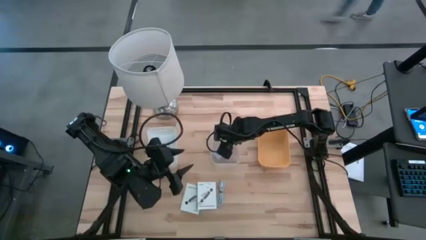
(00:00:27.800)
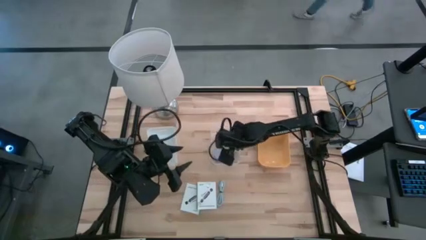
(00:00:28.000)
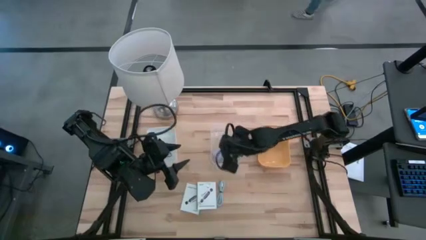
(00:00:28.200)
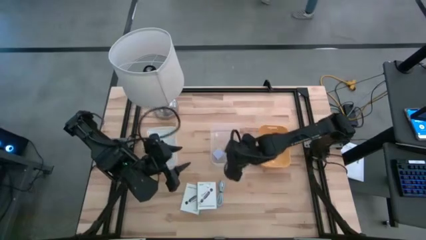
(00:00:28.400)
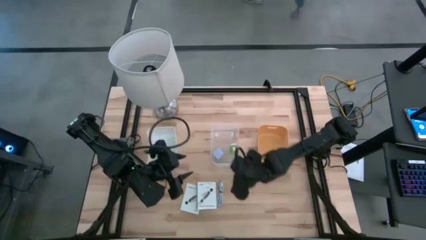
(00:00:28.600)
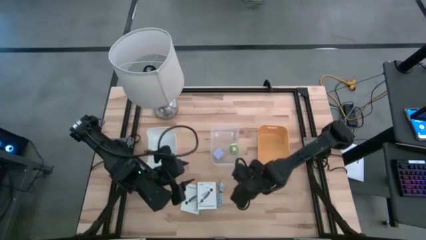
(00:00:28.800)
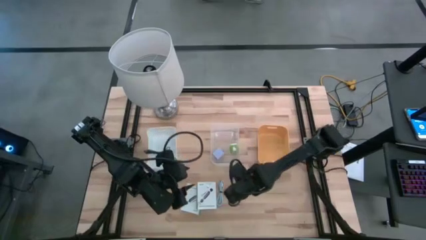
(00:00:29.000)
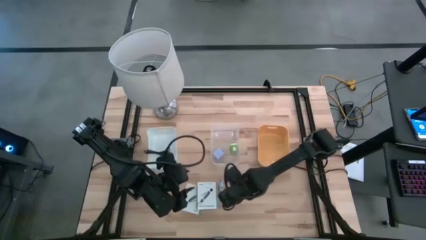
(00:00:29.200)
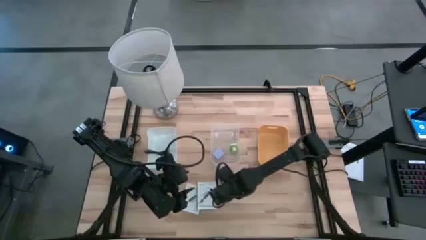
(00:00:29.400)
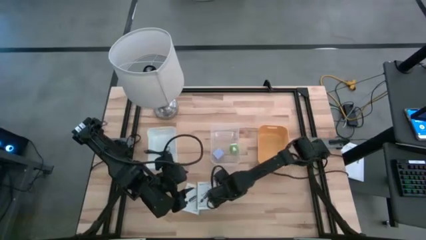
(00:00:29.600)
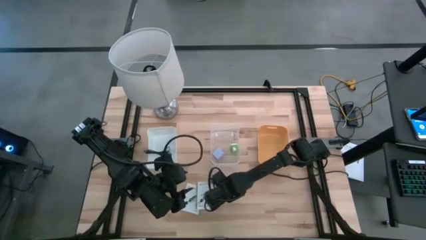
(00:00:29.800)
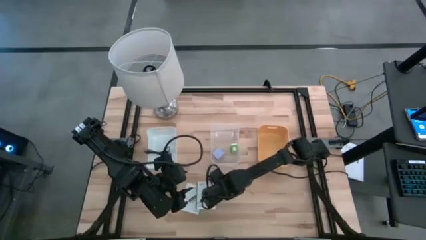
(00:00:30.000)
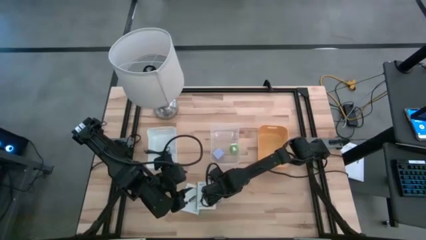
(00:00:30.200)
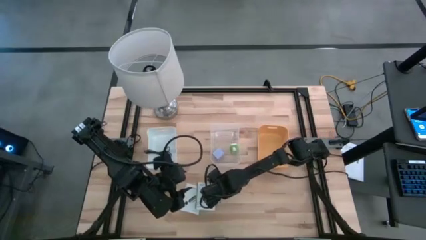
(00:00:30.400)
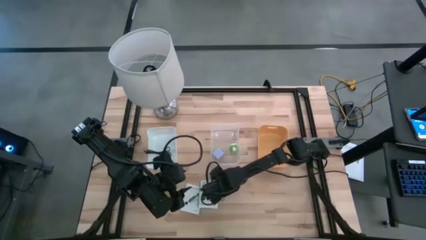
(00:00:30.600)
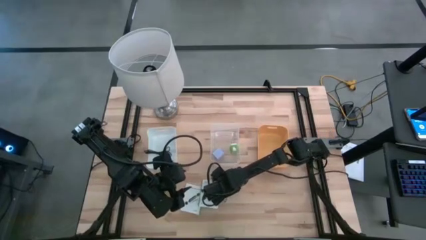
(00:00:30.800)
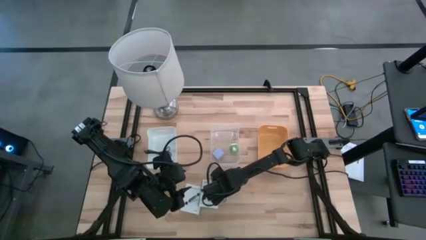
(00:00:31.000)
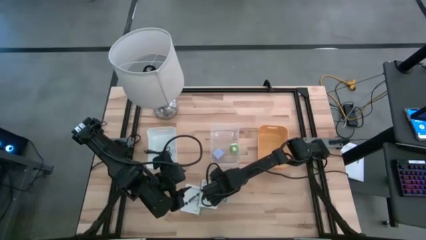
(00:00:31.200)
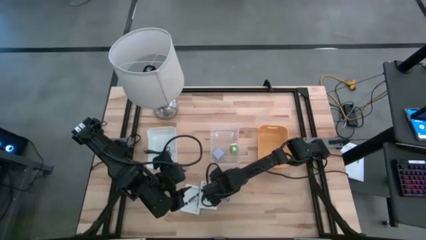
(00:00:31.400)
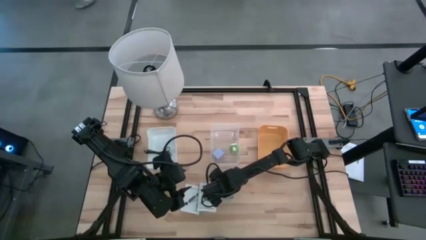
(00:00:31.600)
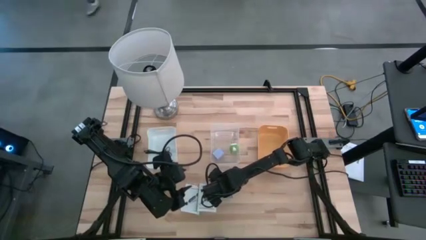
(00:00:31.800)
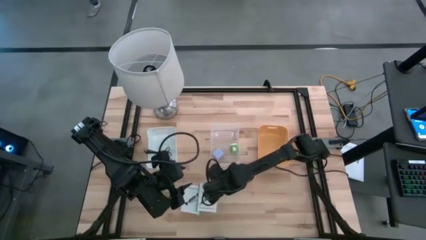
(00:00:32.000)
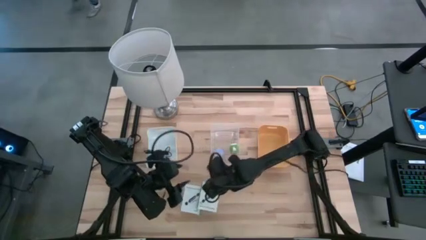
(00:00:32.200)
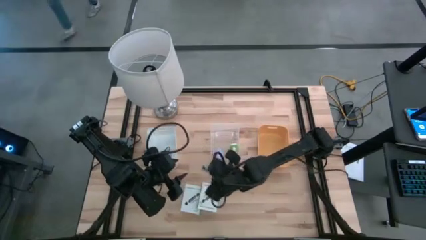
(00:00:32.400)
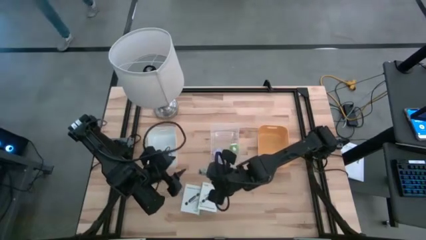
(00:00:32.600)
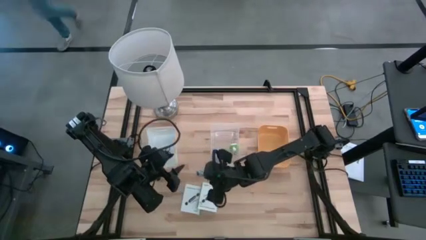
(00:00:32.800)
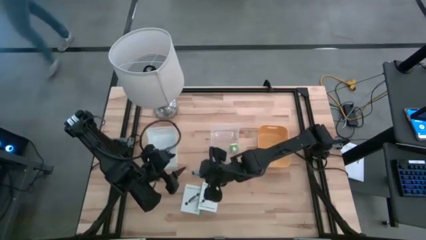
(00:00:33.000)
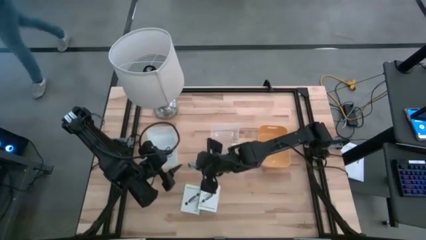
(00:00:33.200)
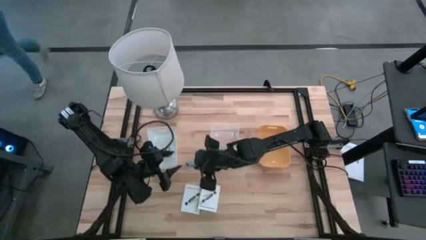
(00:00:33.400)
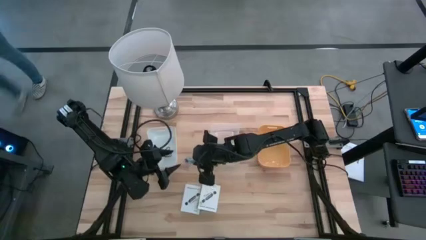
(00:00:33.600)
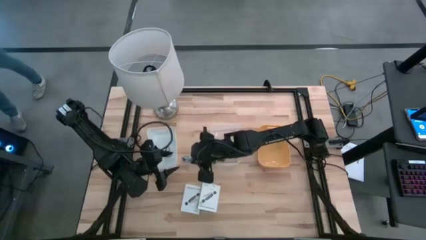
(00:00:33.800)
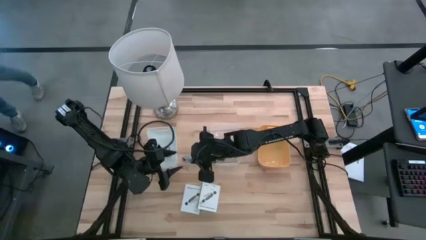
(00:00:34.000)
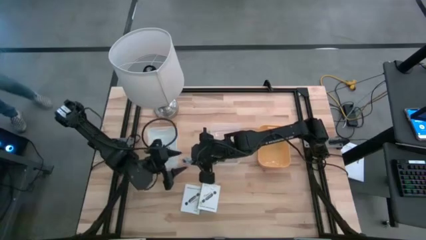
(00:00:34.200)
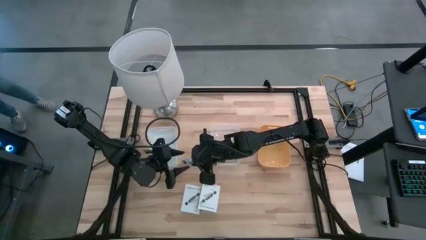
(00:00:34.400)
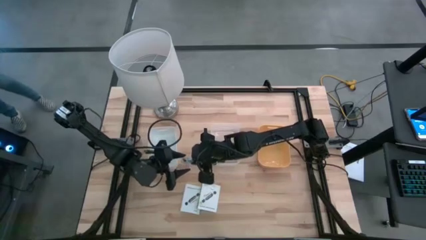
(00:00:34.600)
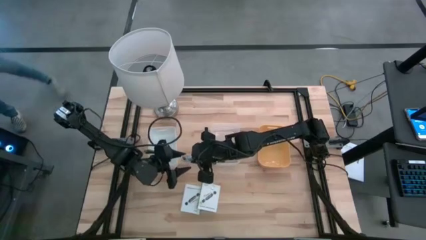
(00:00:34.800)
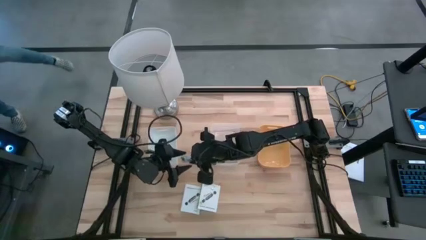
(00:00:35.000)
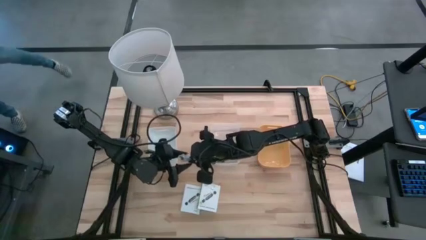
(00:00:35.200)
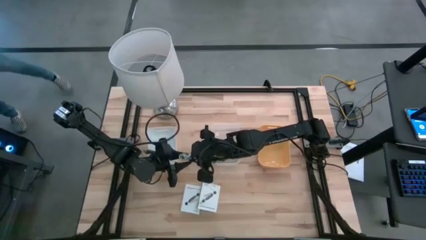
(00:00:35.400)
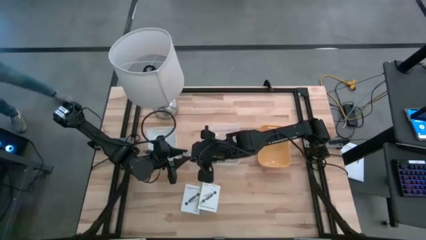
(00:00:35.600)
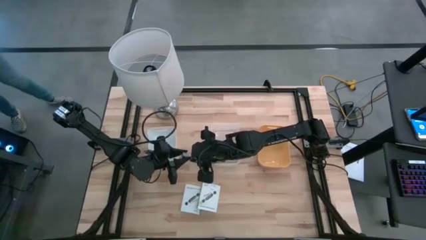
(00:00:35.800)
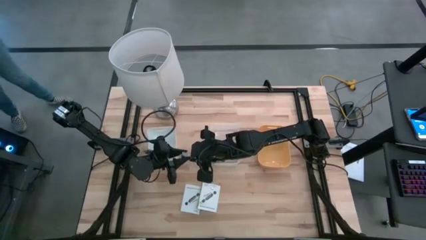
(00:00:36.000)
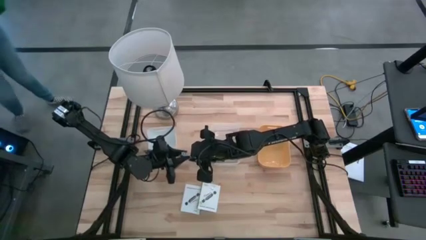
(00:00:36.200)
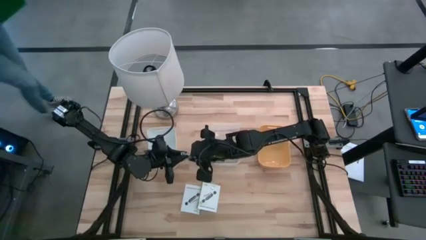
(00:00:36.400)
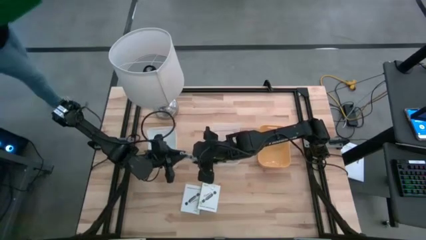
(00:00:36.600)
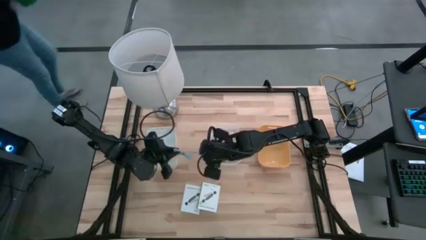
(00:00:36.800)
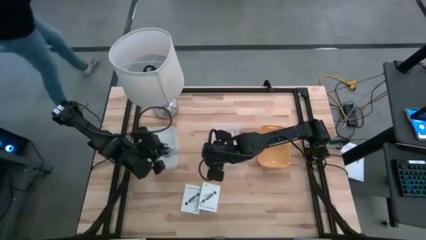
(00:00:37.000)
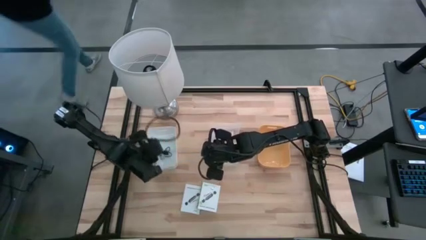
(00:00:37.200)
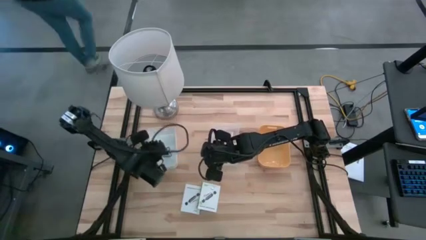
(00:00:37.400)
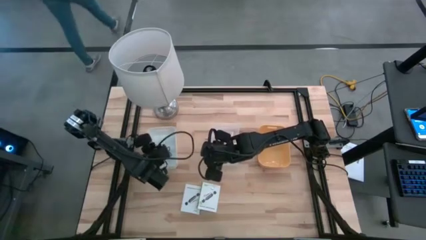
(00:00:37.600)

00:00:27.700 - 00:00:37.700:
Task: Pick and place items into bin
Put the light blue charger cable into the white bin

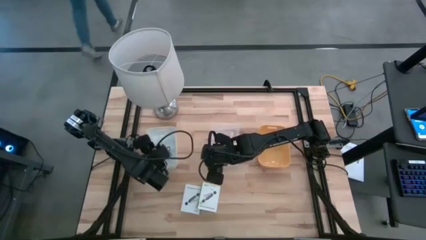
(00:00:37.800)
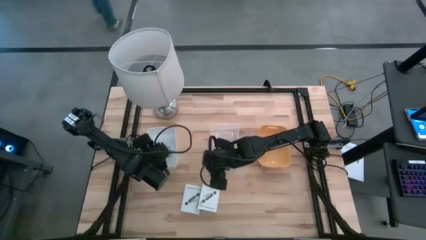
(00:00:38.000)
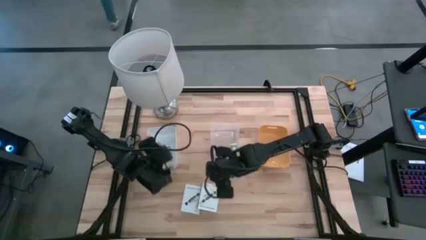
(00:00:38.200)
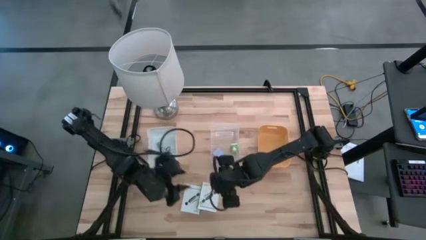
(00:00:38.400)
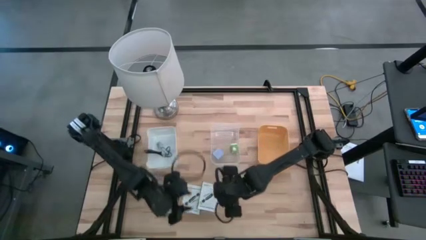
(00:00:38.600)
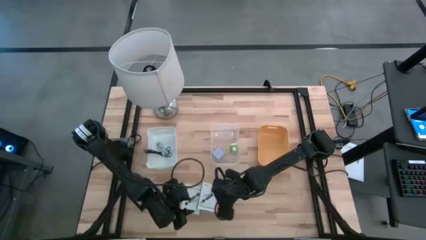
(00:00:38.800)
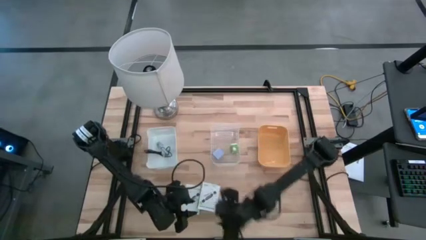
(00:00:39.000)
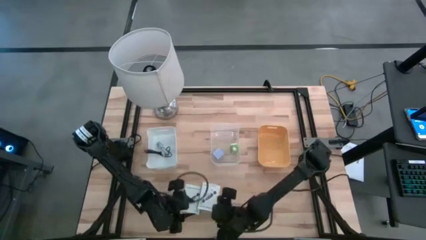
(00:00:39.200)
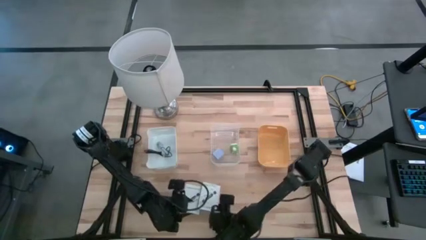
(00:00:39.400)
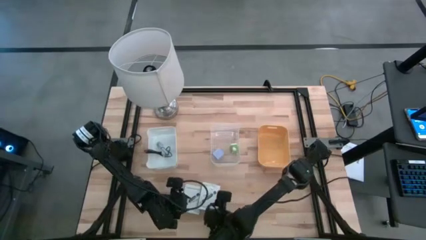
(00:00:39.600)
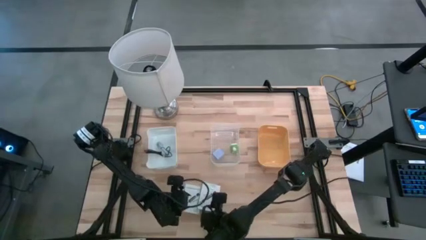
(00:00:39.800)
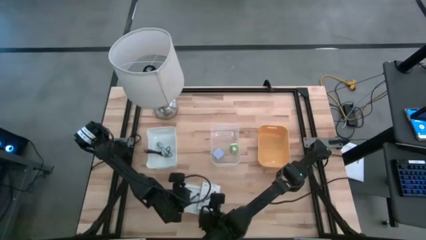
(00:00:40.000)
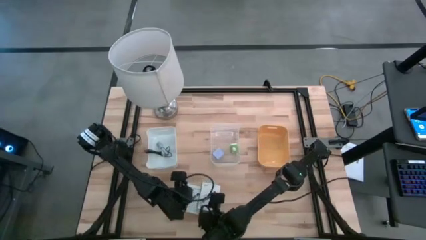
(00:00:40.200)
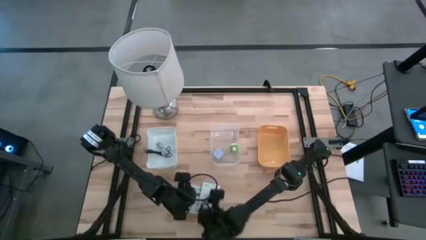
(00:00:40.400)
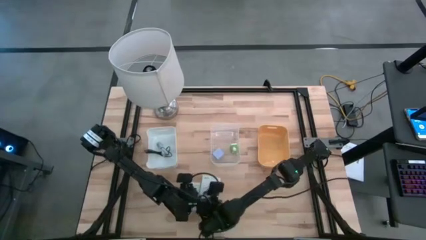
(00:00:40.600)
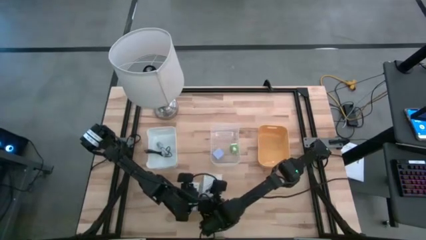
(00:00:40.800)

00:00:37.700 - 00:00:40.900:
Put the right card reader box into the yellow bin

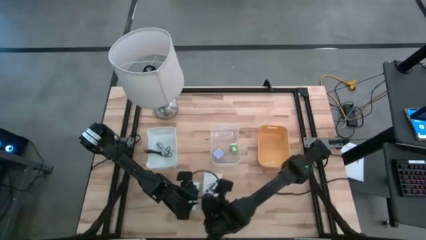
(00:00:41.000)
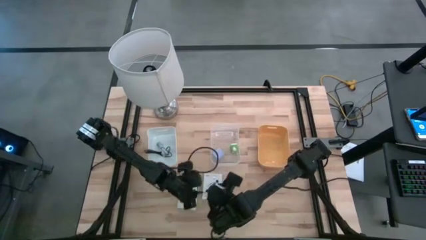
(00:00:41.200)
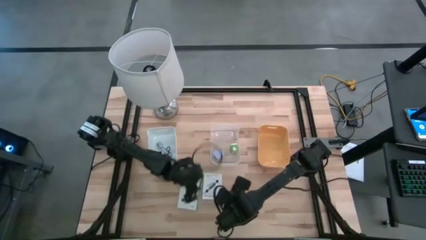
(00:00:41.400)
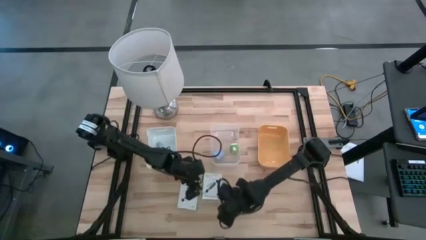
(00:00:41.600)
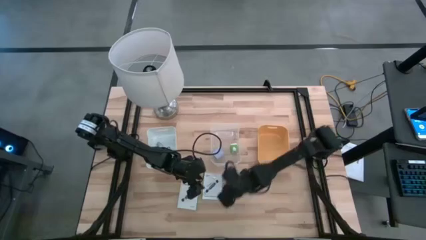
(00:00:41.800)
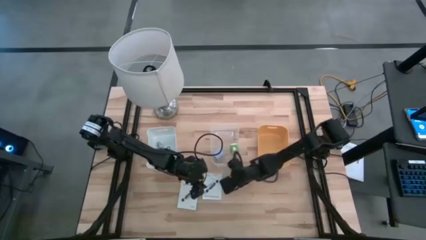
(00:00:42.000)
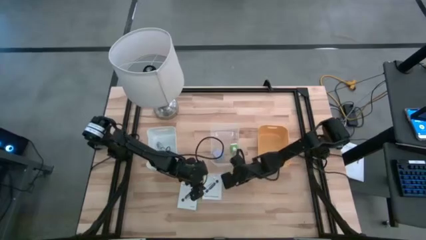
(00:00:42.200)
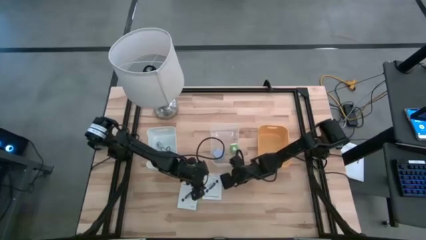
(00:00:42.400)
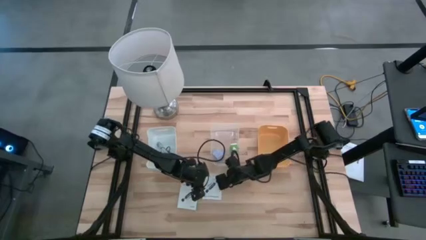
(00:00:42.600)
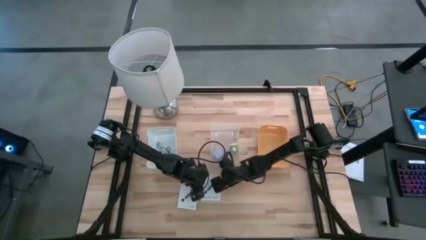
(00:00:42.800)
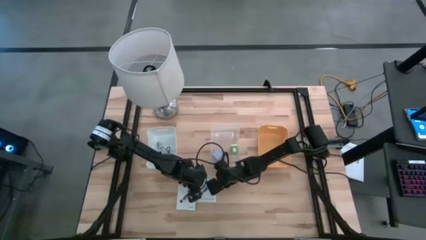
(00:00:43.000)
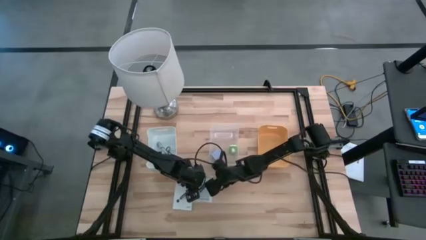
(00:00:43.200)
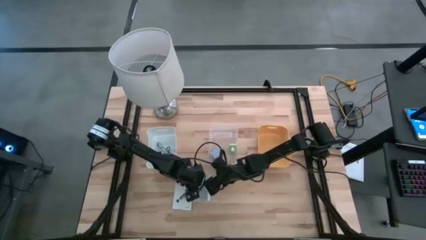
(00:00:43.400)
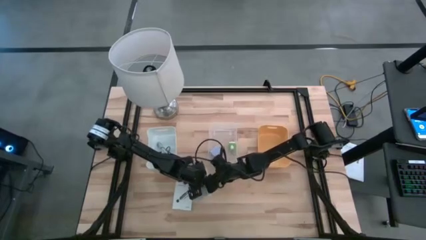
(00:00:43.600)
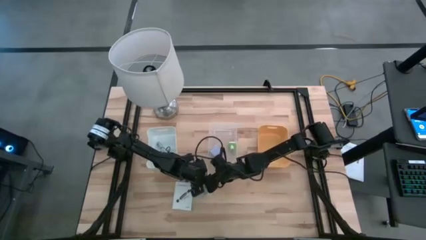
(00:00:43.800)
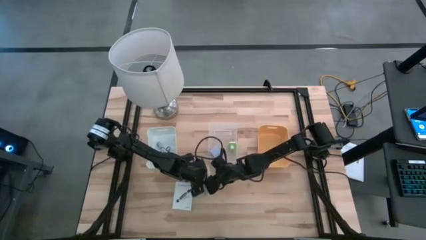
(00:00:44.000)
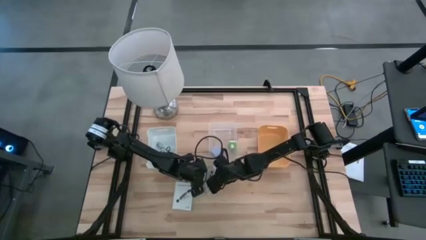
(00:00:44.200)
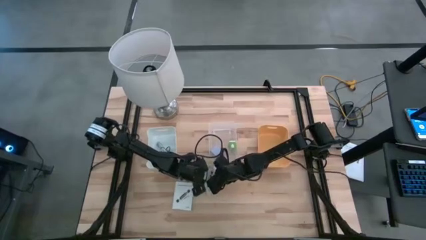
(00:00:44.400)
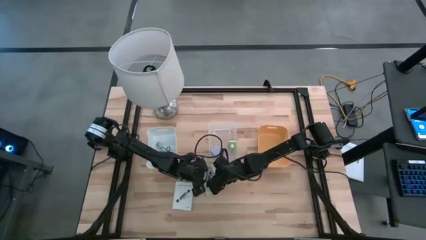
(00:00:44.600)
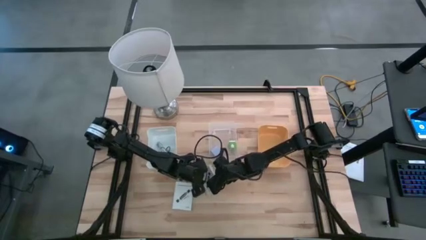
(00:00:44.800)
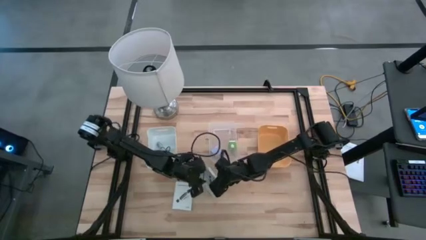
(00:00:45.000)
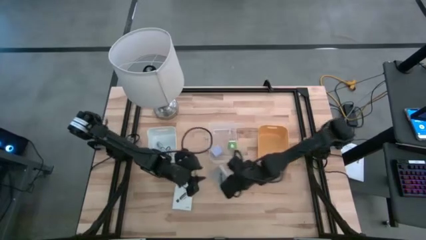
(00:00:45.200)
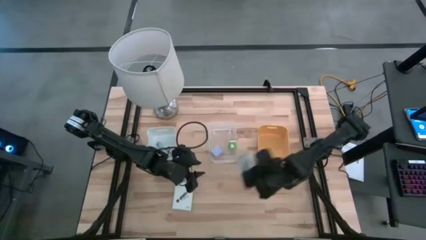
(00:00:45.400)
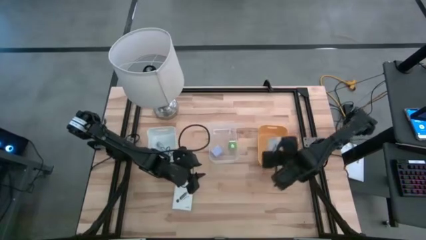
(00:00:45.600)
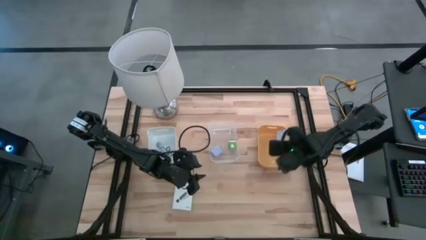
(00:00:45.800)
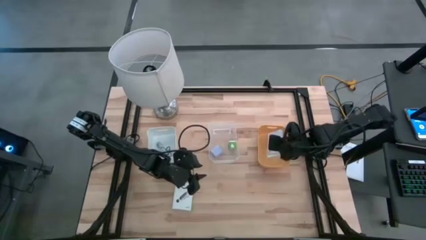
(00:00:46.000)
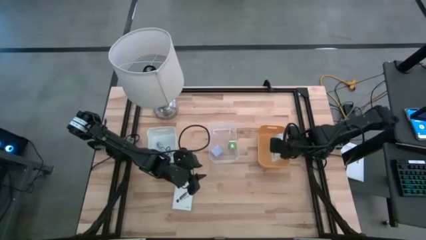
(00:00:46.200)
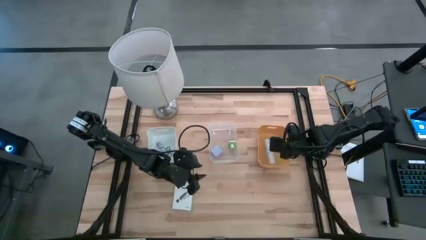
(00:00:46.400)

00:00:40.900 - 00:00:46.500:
Put the right card reader box into the yellow bin
